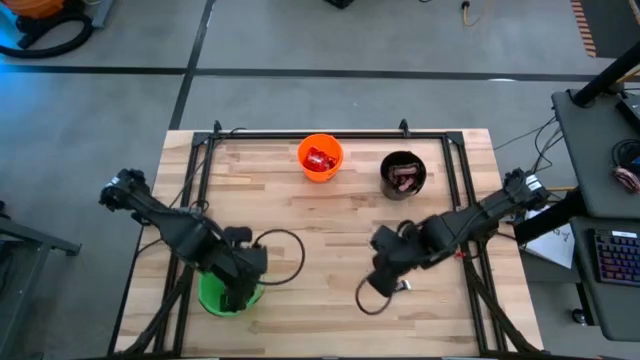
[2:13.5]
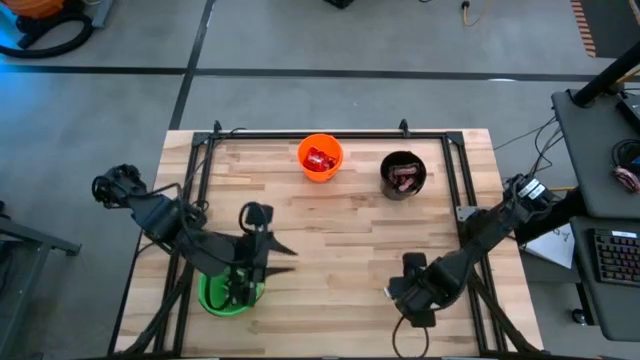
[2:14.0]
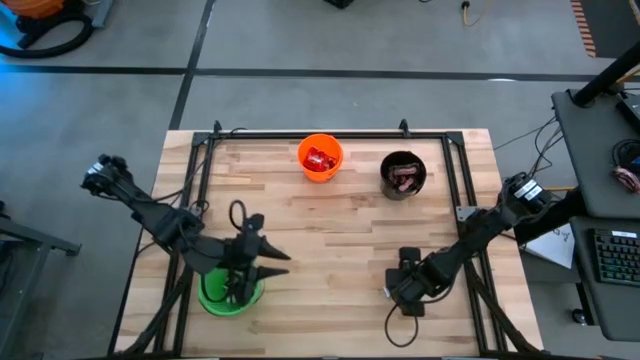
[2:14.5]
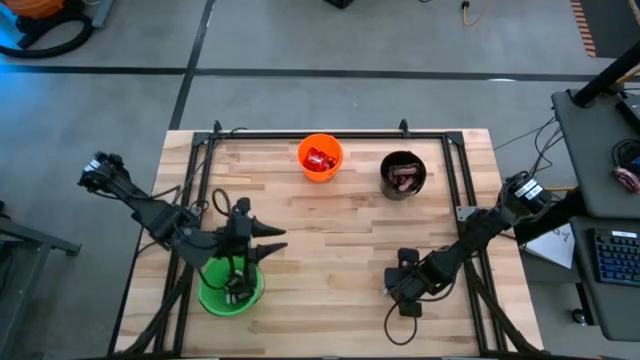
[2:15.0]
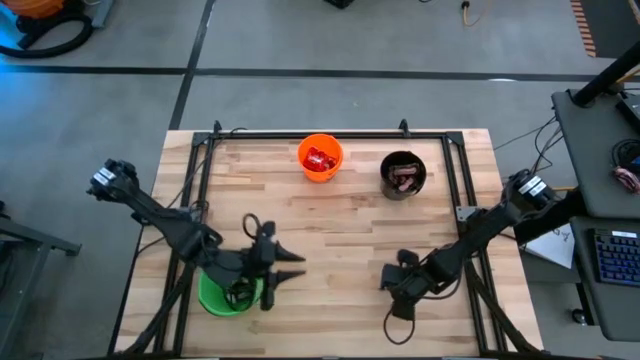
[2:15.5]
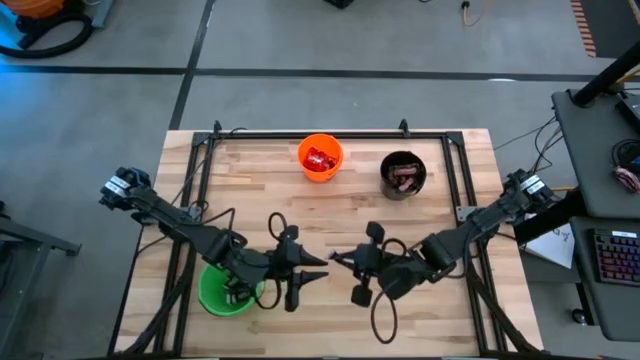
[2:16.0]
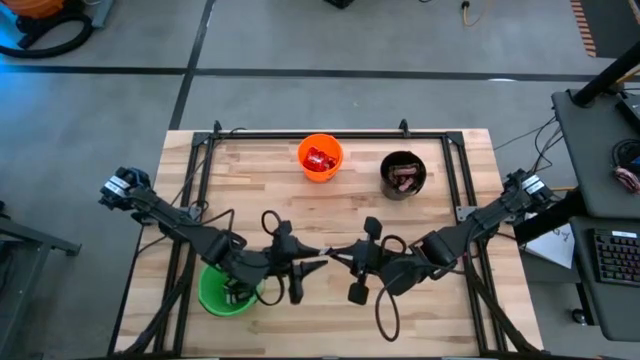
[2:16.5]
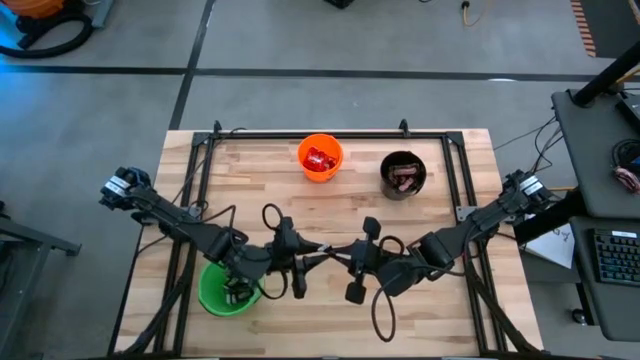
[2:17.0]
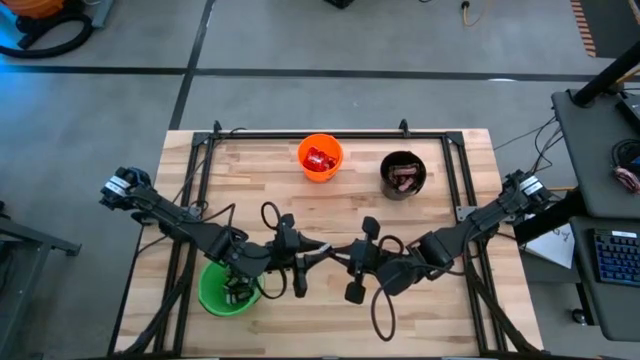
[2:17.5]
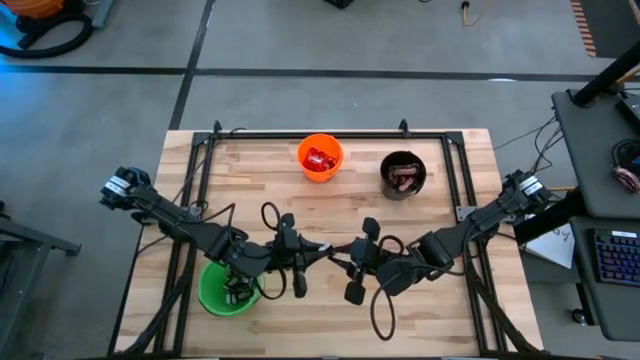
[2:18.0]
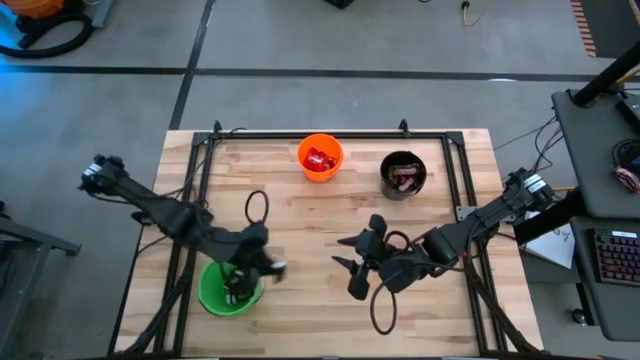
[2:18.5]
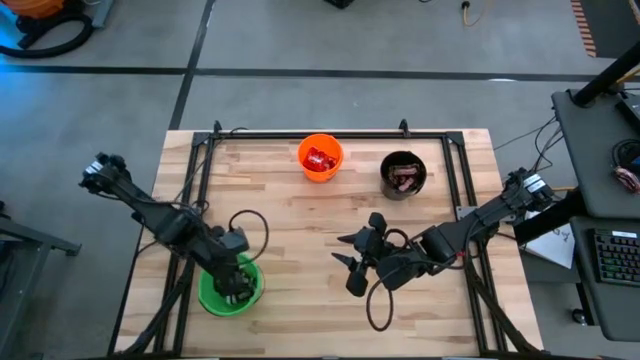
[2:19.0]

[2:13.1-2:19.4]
Task: Sort candy
Put the black chocolate into the green bucket

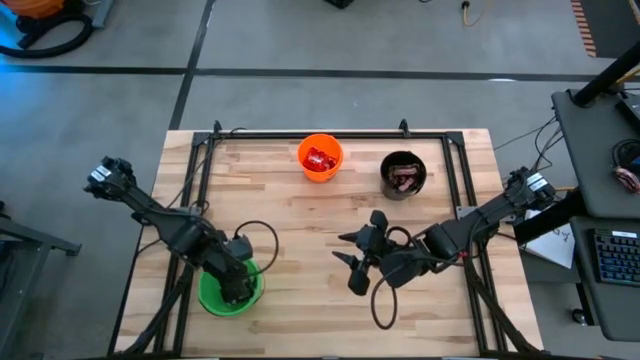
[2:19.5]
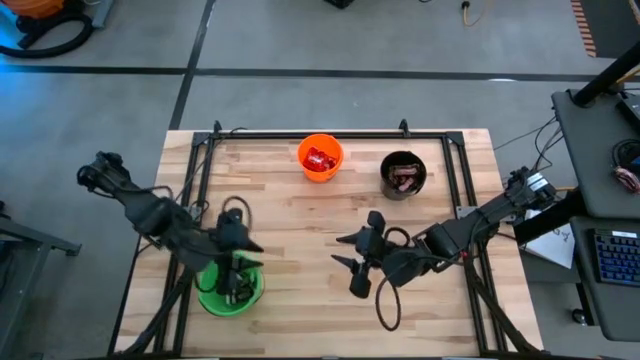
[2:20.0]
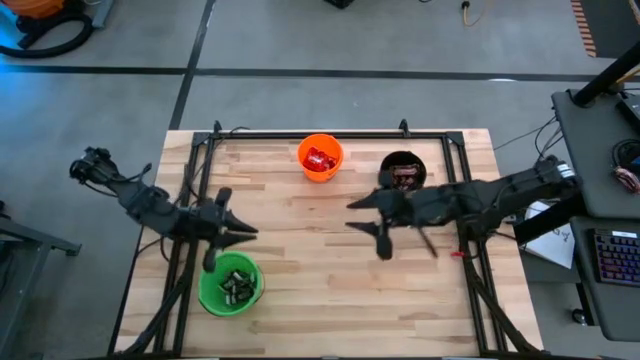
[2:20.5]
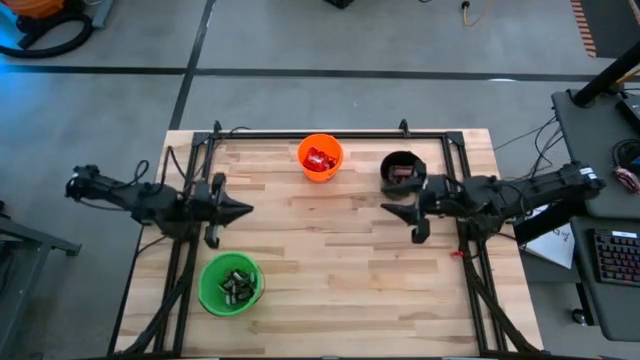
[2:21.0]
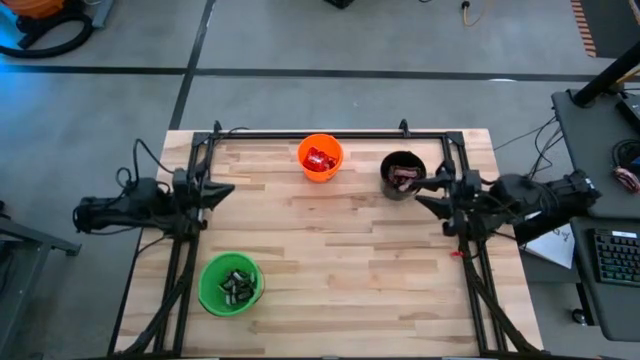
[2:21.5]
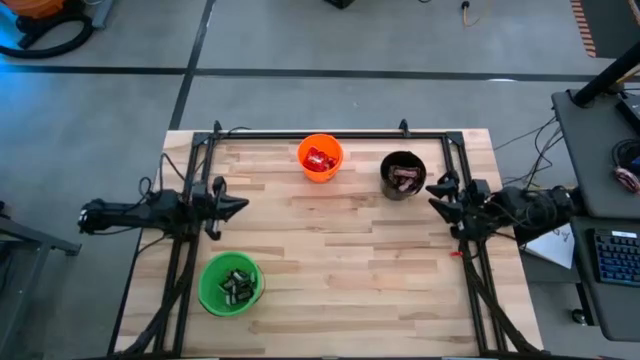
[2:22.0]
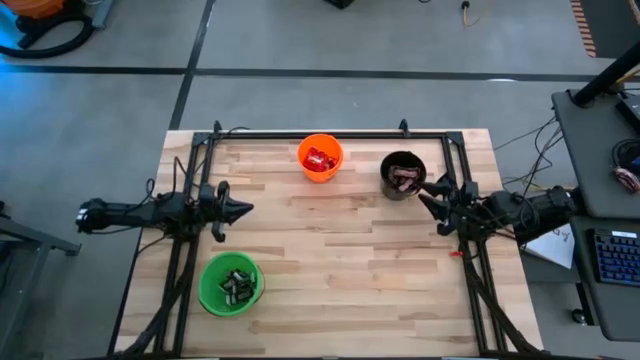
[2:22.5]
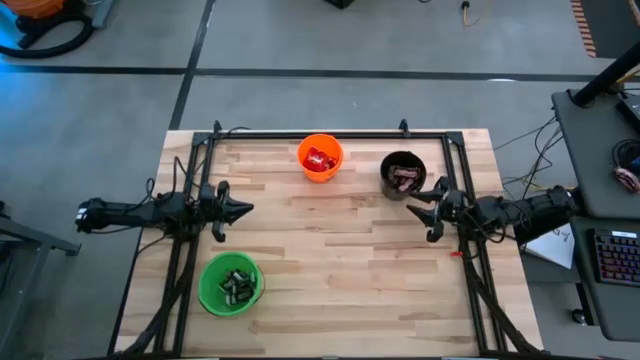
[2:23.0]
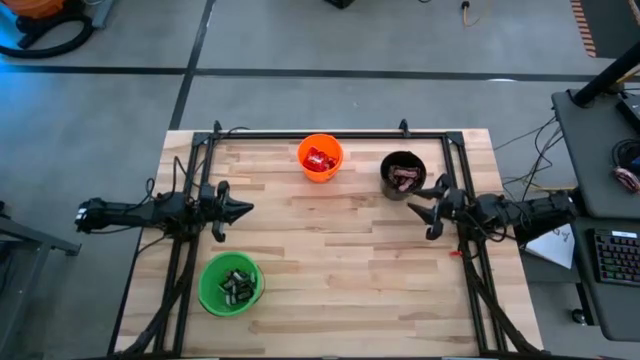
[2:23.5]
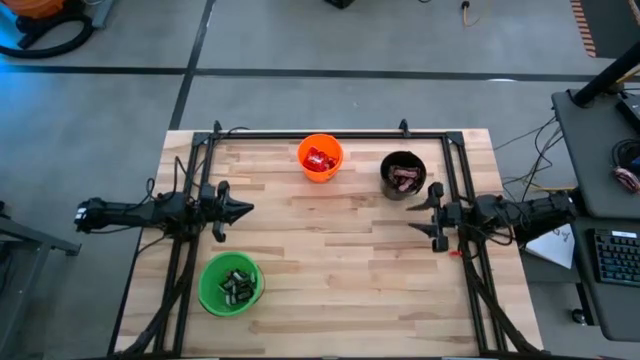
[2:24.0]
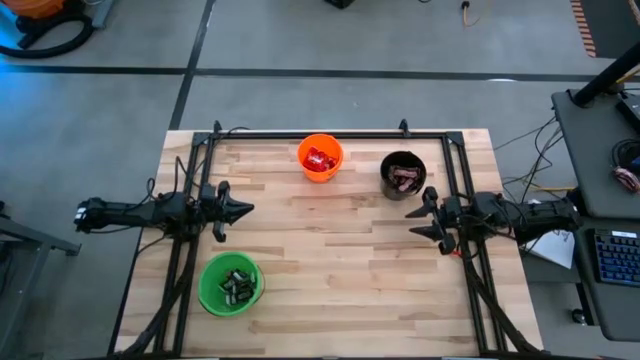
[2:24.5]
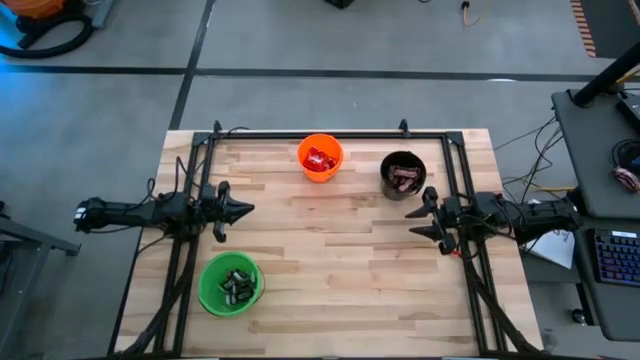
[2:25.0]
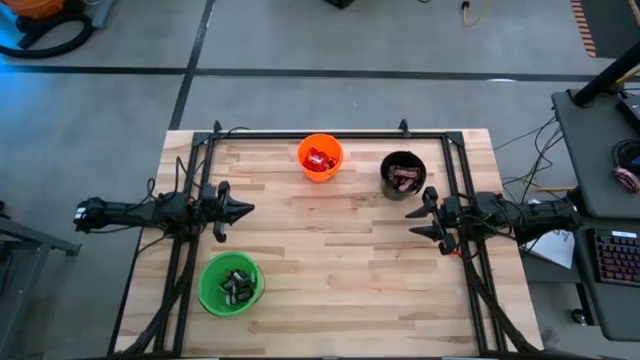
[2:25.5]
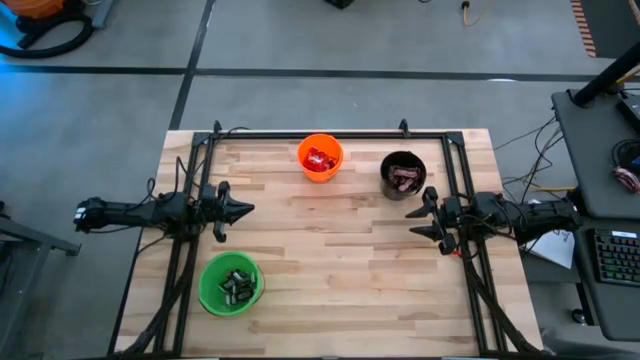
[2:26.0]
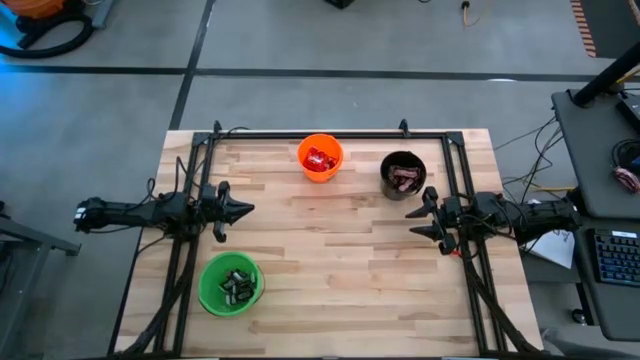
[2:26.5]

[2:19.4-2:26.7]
Return to Home Position

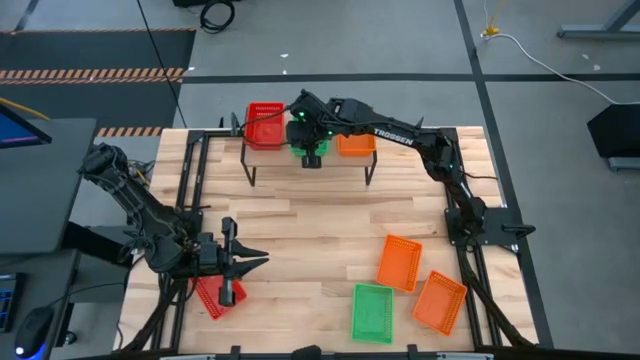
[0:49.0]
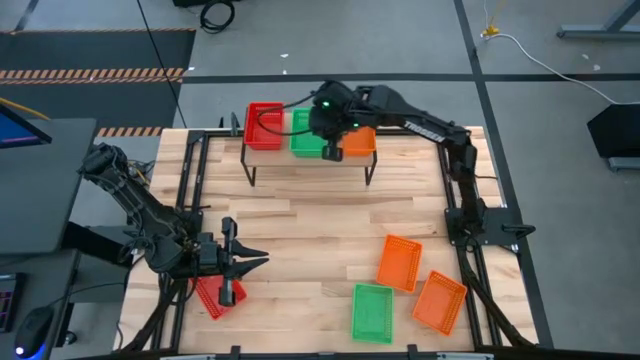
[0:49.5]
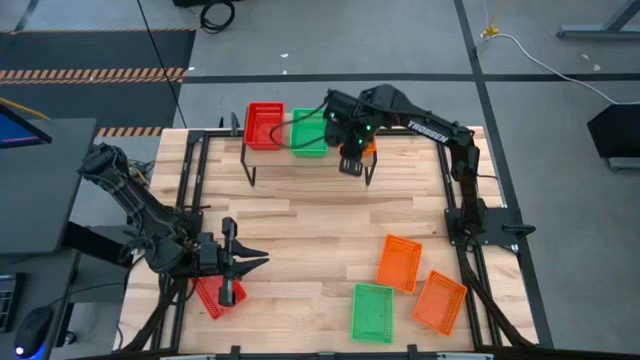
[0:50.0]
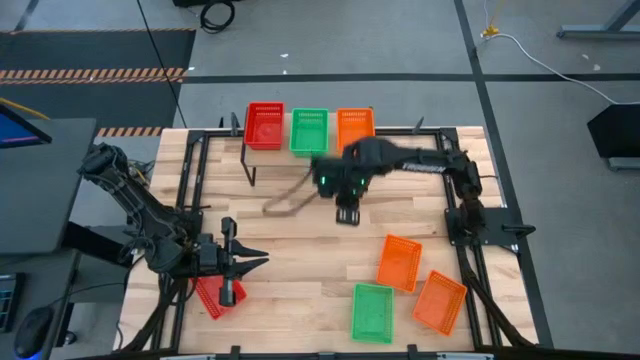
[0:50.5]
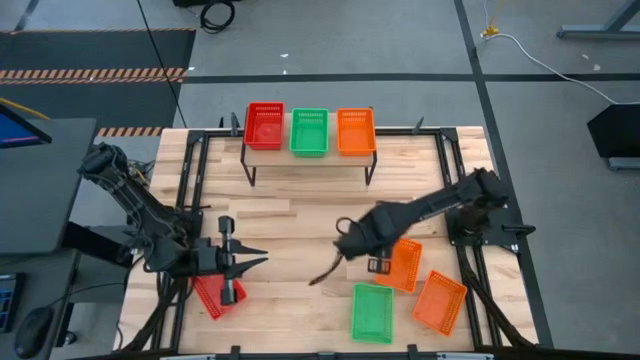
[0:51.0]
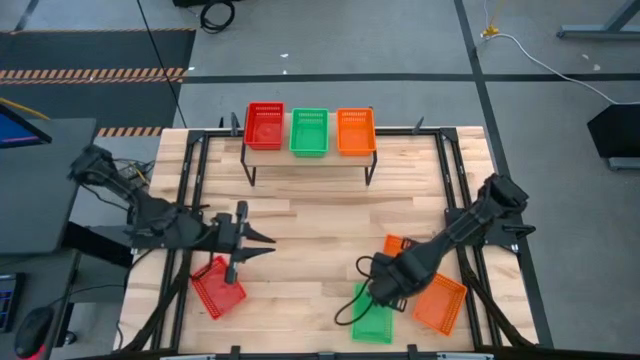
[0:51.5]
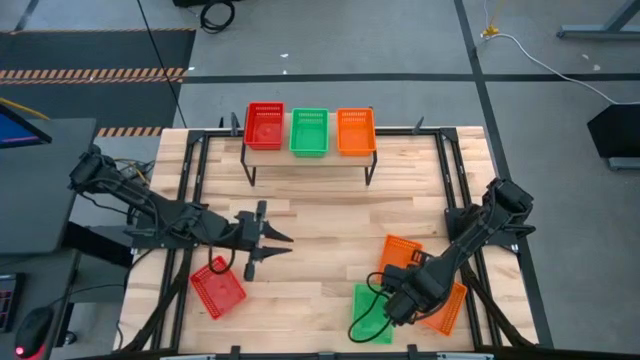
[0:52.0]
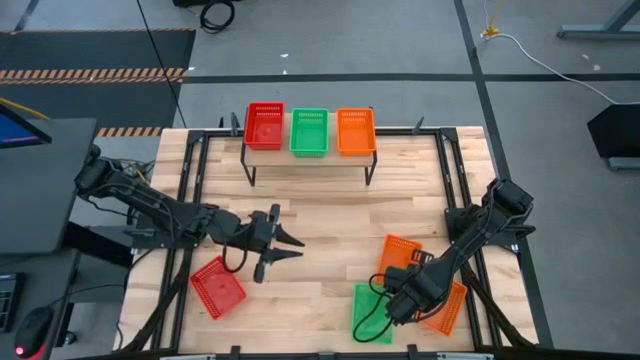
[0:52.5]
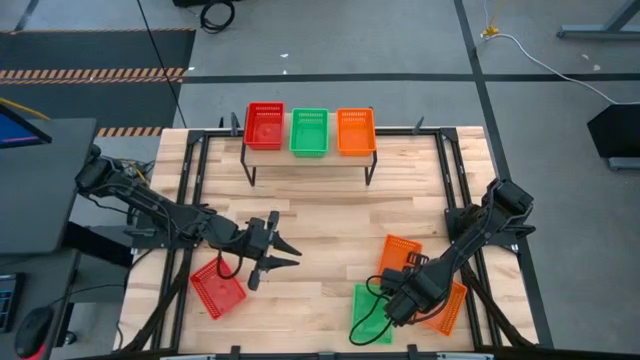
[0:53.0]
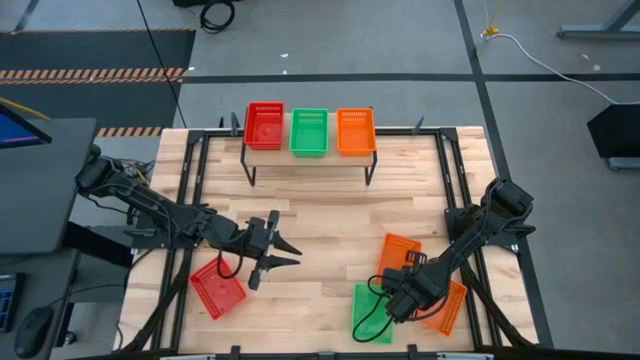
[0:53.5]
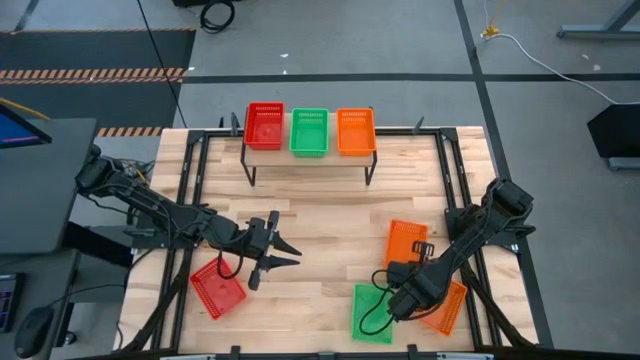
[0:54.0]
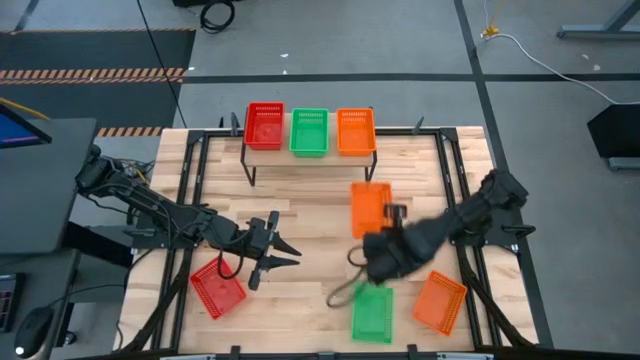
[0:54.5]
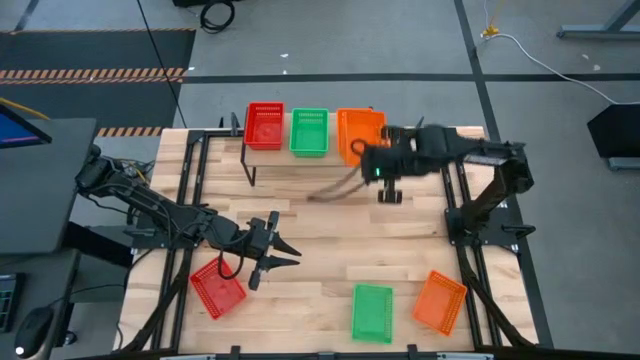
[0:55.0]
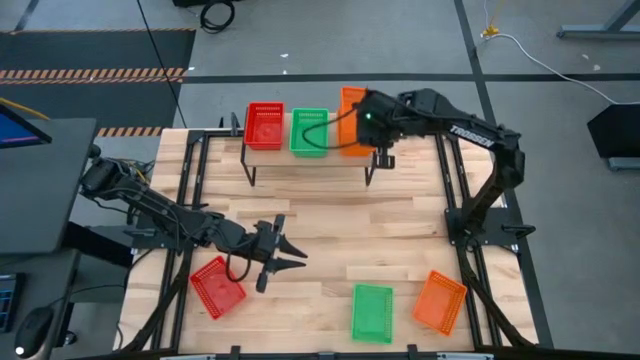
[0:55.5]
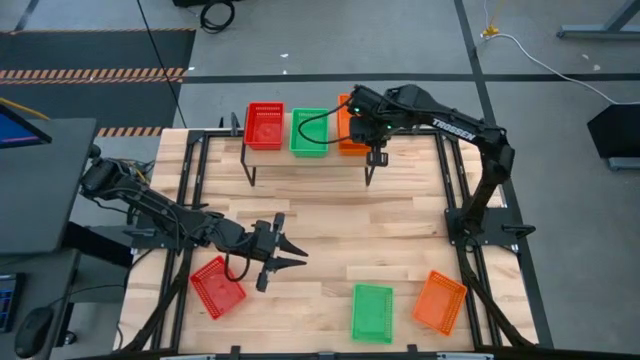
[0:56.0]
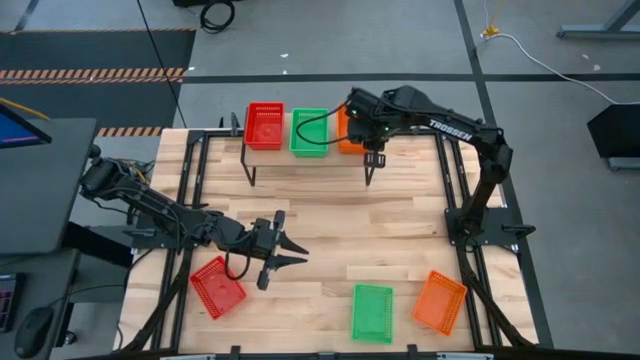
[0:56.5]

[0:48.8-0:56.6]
Task: Stack baskets on shelf by color
Stack the top orange basket on top of the orange basket on the shelf
